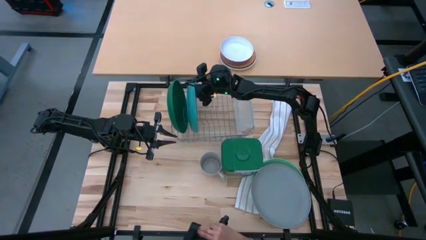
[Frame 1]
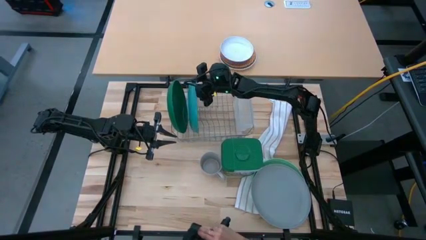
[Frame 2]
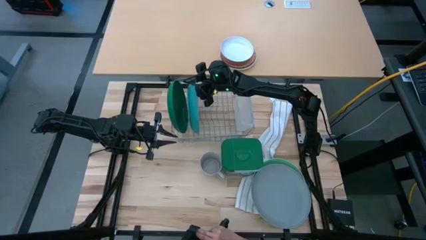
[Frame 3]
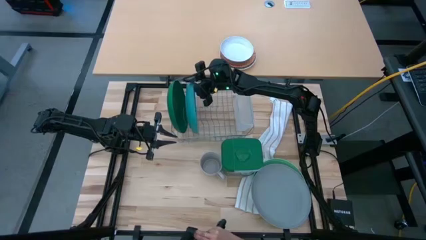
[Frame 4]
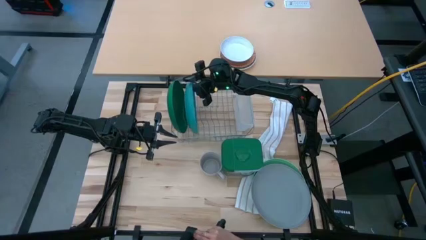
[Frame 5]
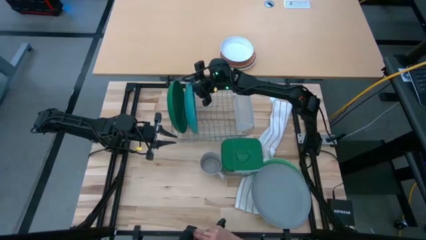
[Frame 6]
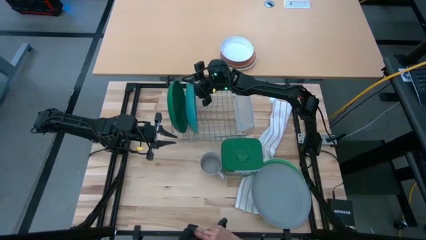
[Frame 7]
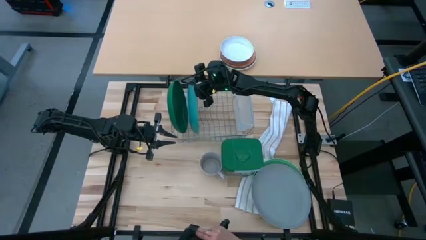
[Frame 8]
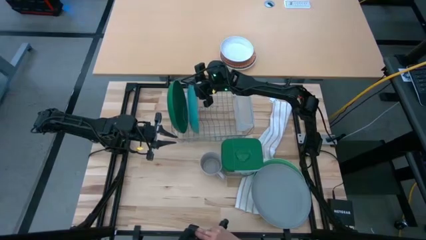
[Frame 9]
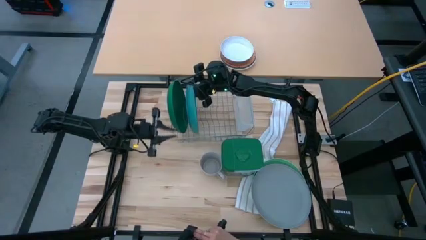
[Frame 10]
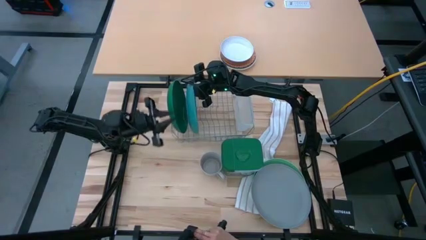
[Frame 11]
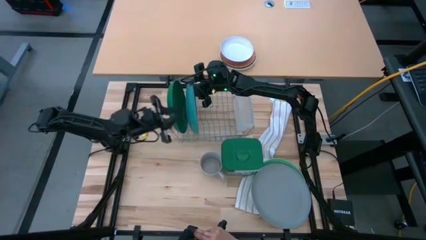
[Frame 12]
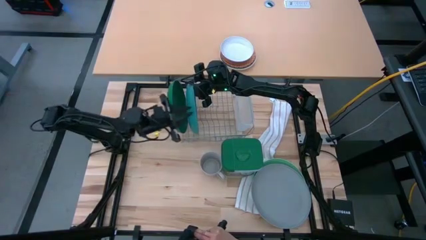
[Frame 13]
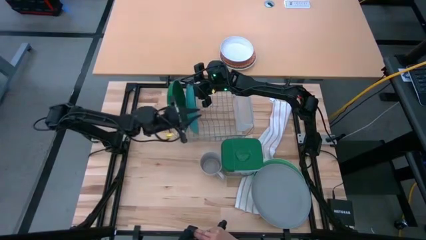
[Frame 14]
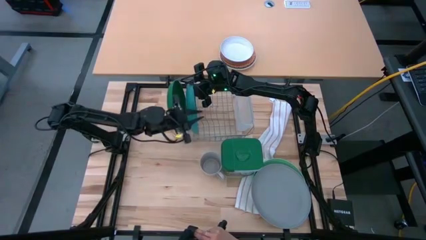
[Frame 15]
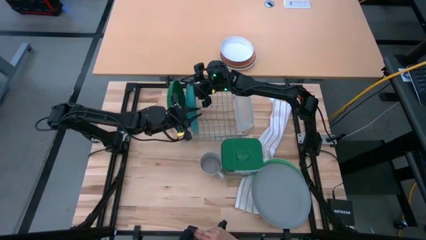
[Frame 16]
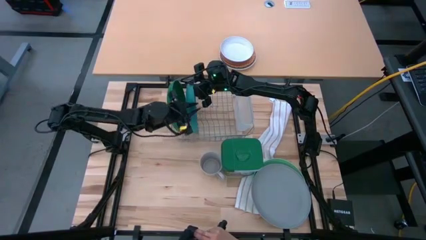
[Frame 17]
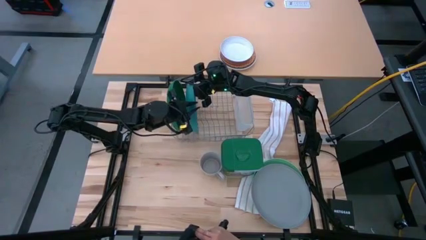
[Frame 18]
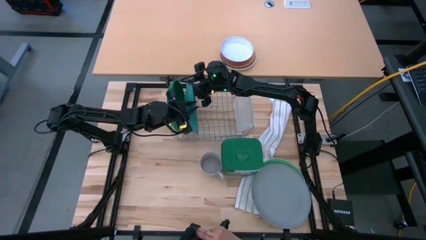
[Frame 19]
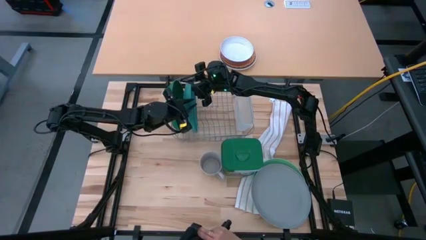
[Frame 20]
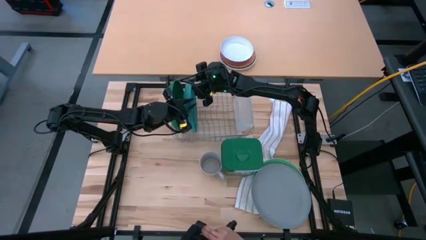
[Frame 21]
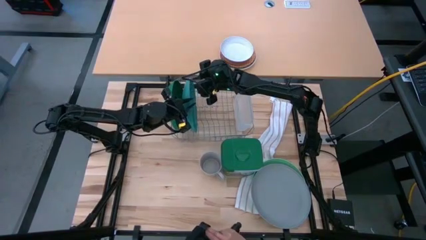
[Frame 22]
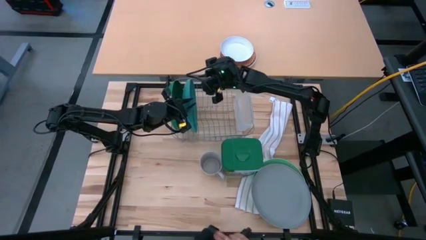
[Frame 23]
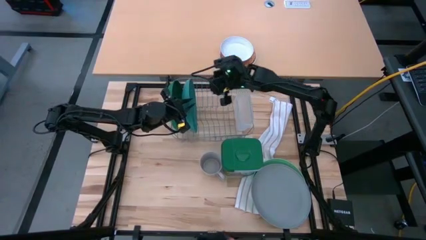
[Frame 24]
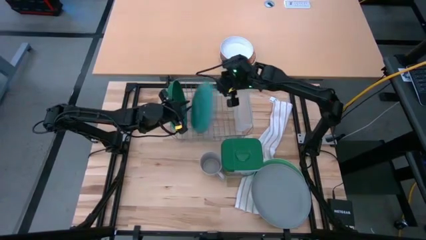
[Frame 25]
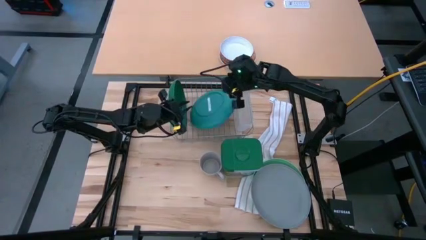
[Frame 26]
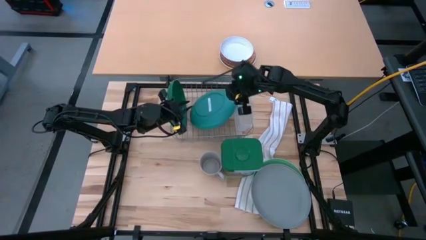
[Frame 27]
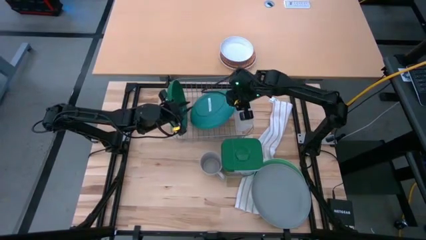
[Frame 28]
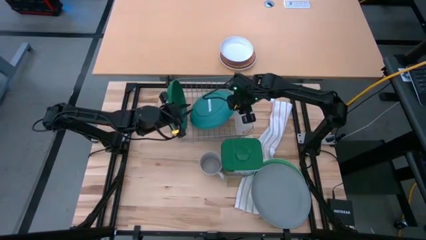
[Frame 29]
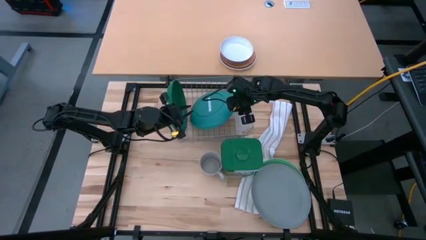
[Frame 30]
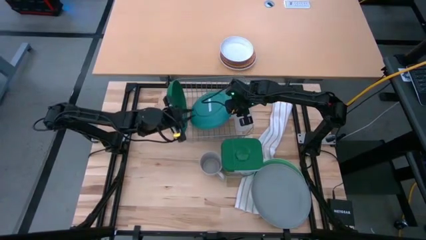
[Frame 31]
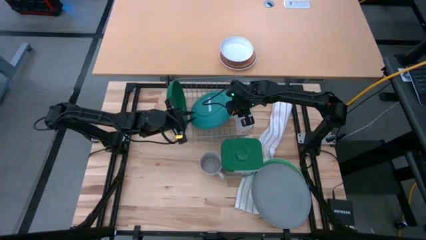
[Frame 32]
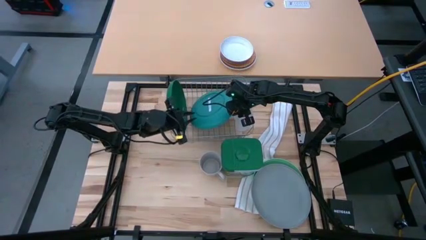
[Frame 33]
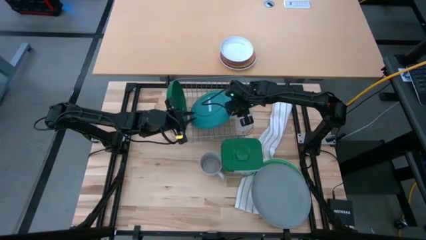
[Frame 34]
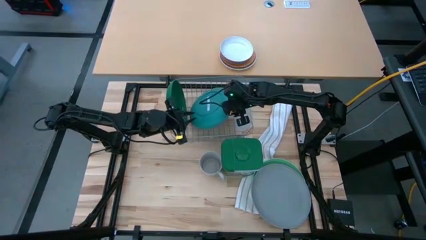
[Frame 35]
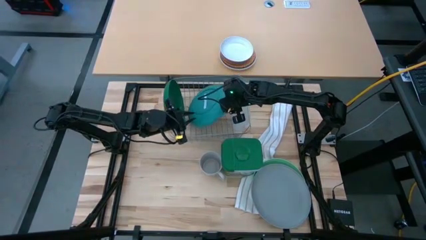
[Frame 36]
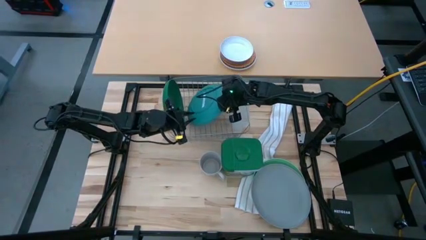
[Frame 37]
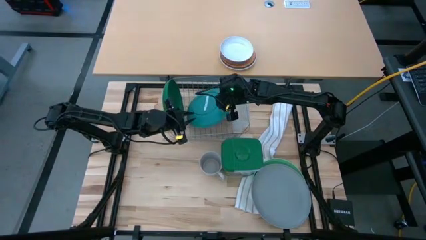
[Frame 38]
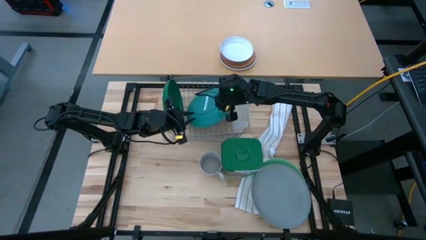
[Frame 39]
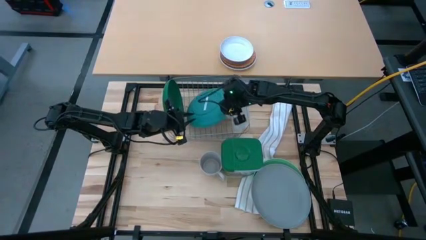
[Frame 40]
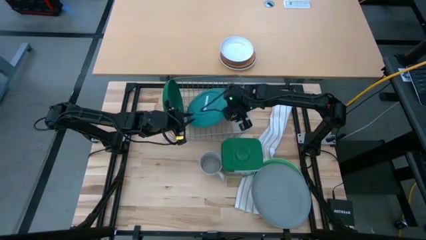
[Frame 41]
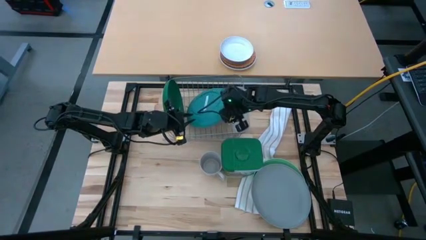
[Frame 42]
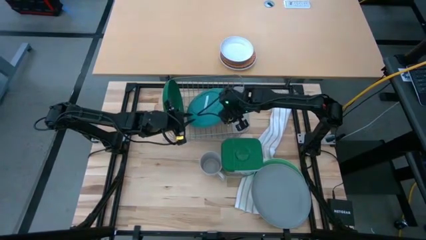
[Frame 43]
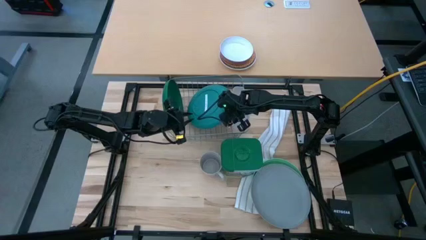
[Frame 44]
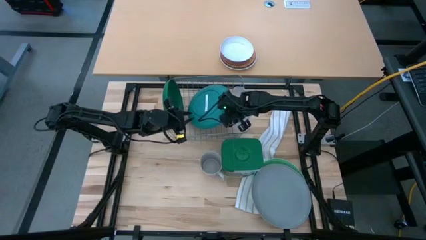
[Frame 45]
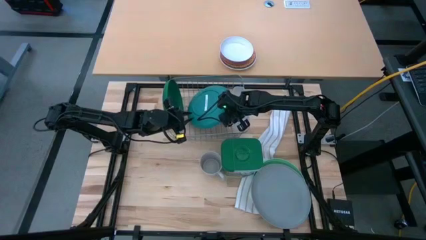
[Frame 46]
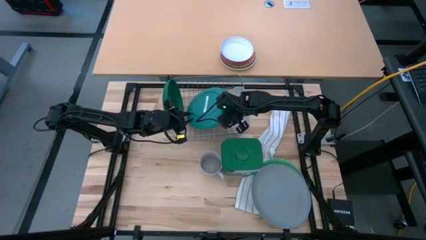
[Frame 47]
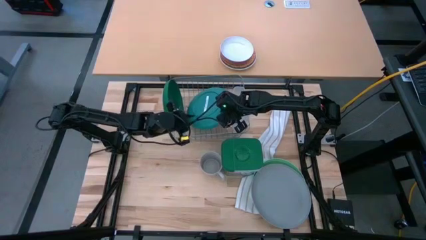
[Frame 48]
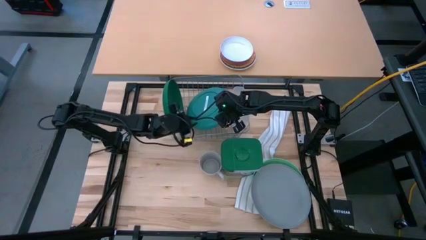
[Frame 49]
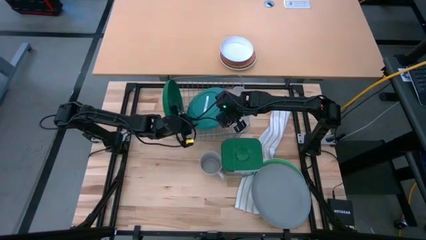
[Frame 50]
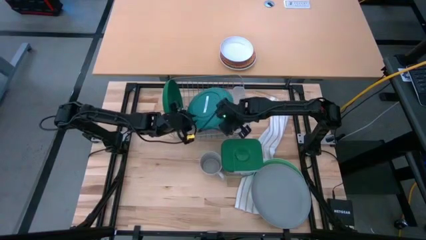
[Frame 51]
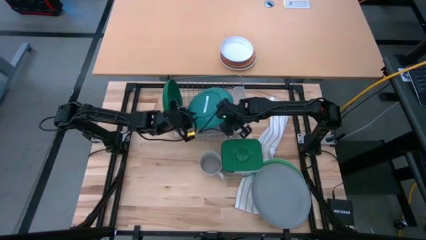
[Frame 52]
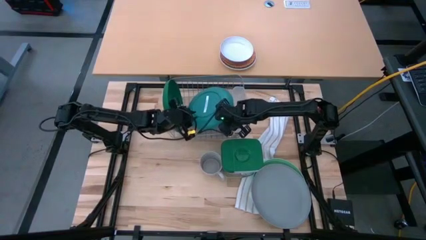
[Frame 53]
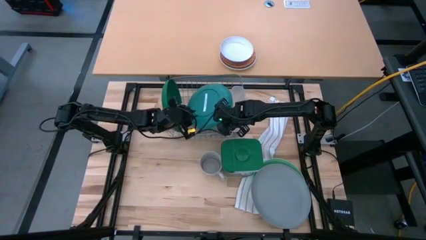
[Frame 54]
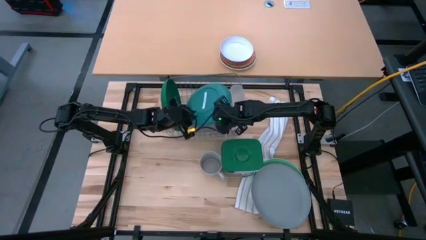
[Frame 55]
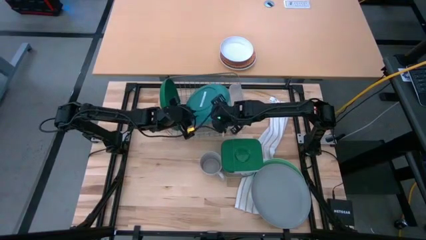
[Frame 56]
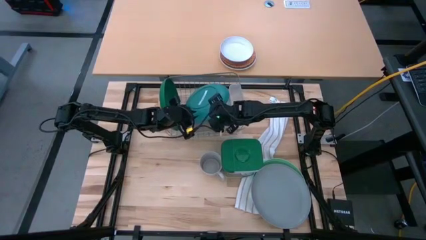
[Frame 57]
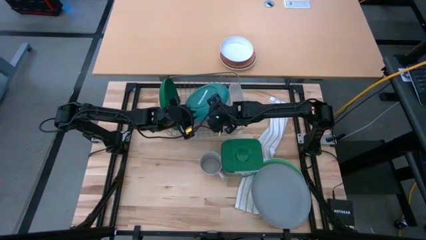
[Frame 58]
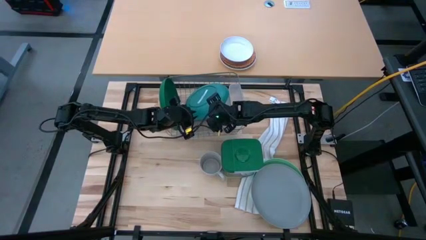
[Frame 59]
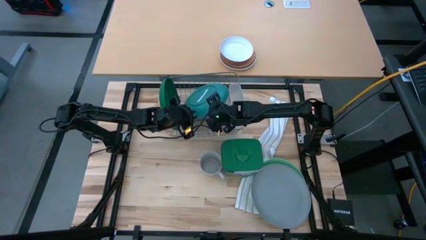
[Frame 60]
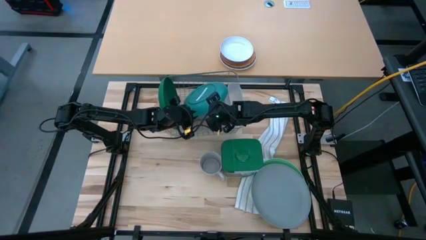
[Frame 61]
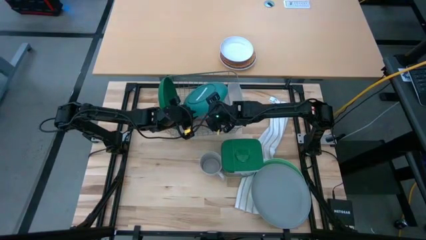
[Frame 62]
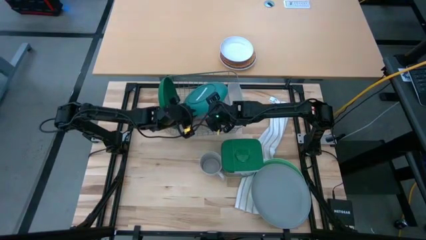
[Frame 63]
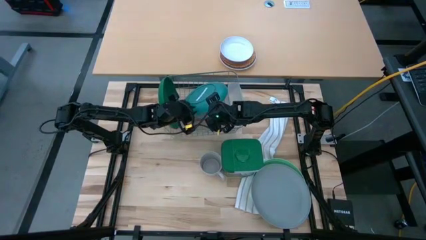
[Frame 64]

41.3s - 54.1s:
Task: Sort dishes
Put the blue plate in the dish rack

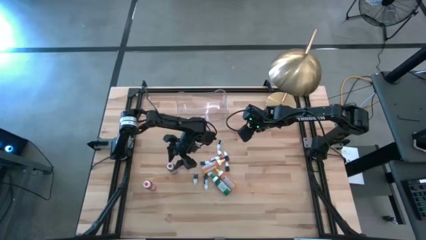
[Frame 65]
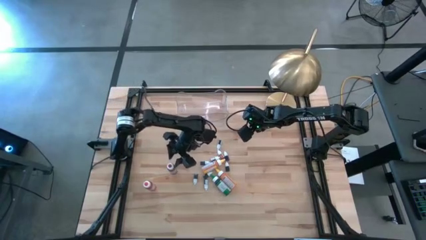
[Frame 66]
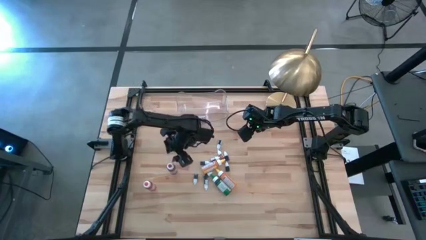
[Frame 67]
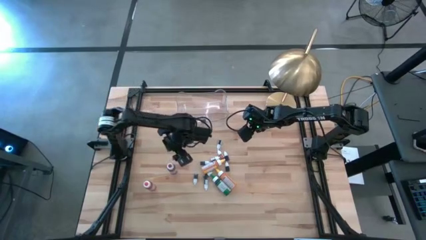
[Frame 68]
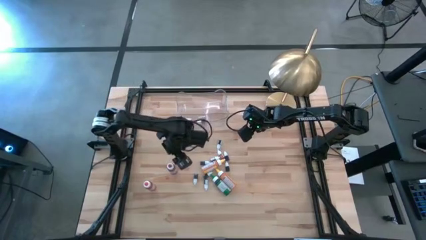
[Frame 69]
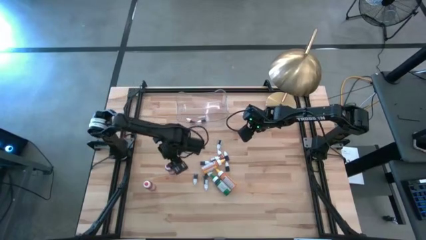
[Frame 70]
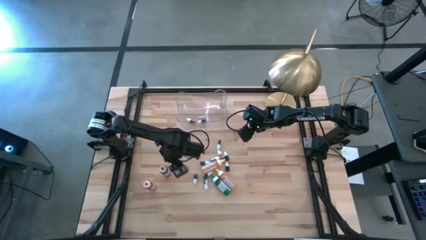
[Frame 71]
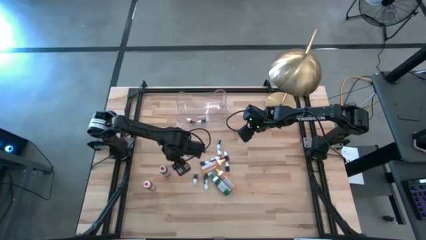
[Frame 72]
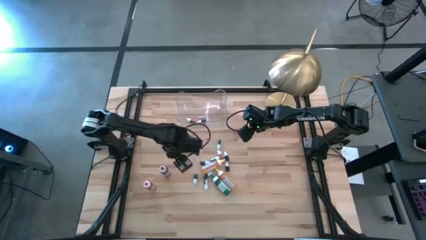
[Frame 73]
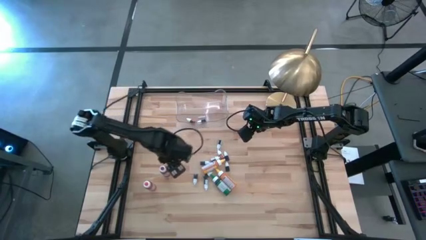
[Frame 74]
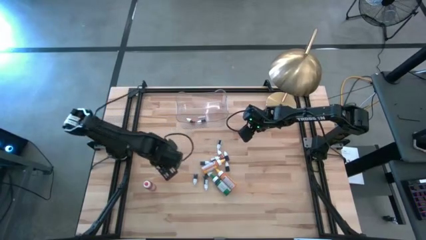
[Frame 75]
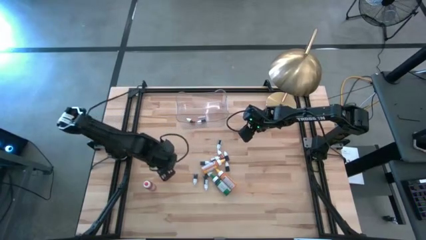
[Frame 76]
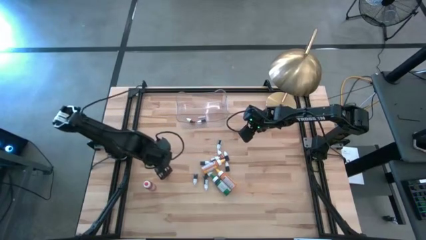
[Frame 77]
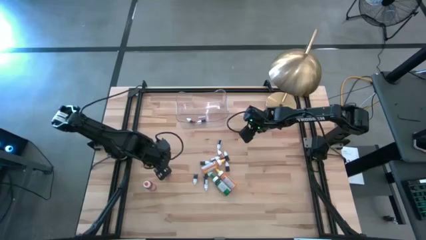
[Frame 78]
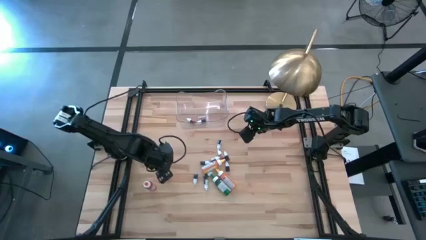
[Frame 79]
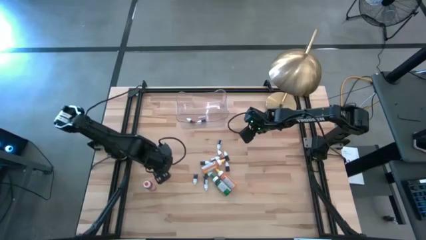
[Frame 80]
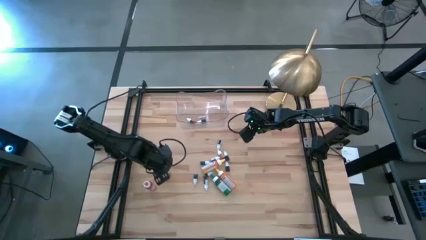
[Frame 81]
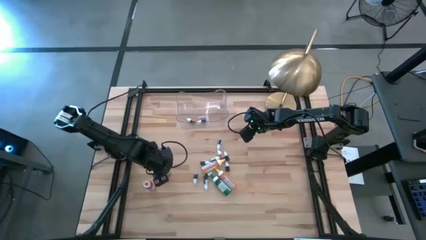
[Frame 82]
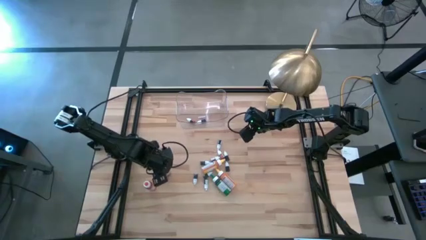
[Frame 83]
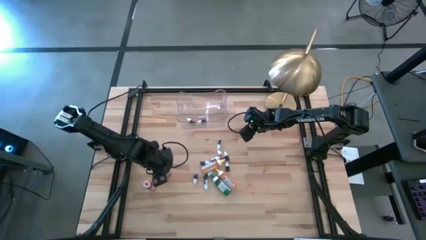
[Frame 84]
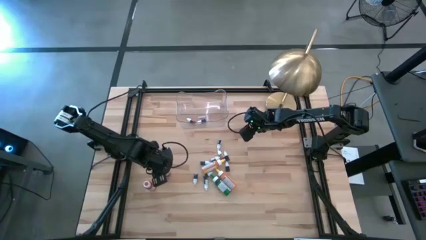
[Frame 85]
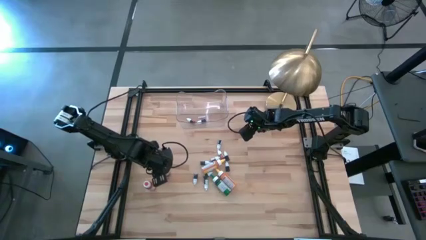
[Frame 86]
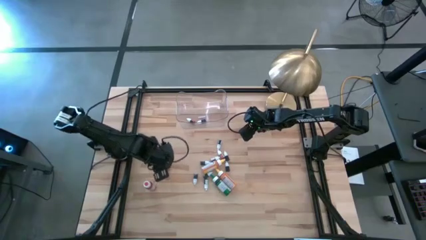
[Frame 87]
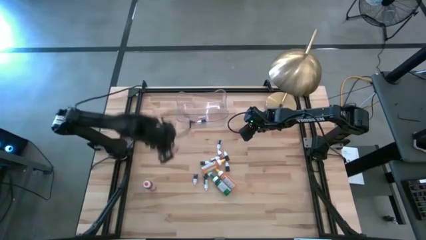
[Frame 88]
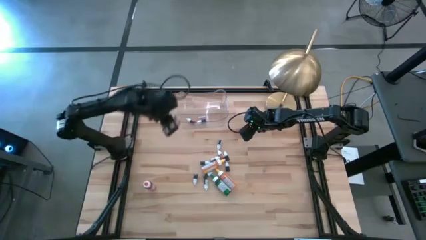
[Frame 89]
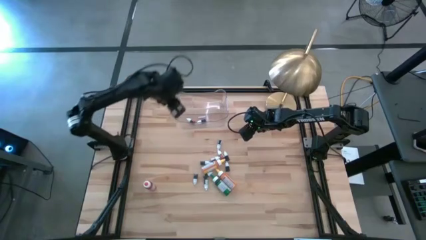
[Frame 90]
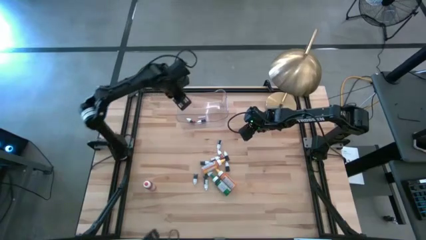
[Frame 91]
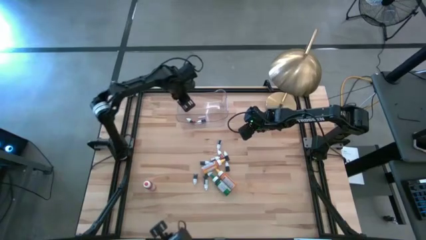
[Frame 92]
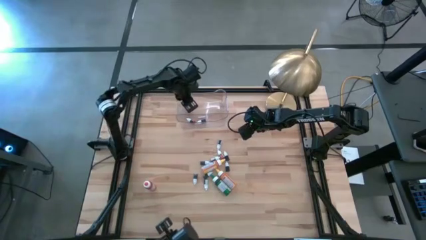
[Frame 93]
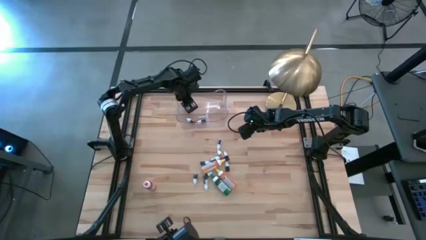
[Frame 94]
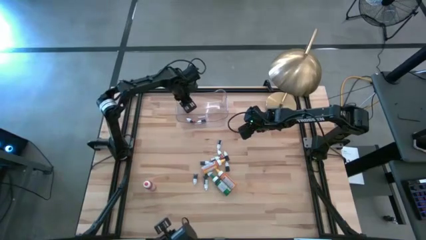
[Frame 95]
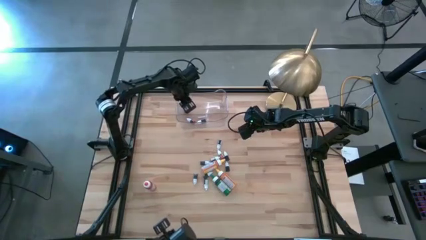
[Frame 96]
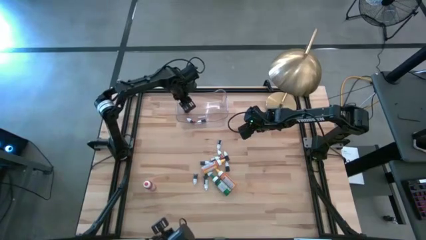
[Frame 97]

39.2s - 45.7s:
Task: Pick & Place food coloring
Put the large red food coloring bottle into the transparent bin
